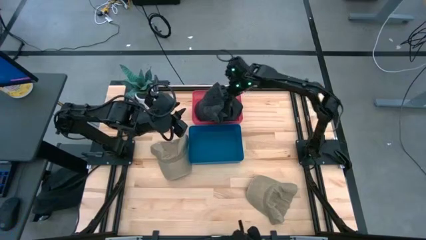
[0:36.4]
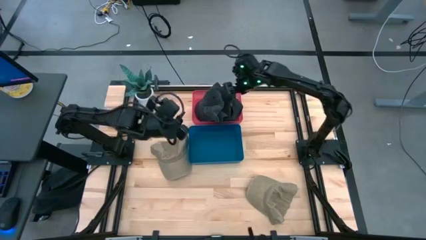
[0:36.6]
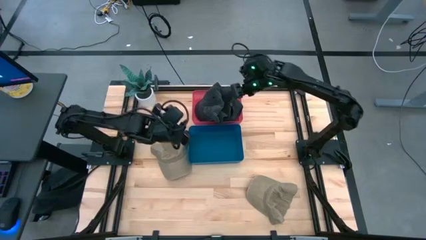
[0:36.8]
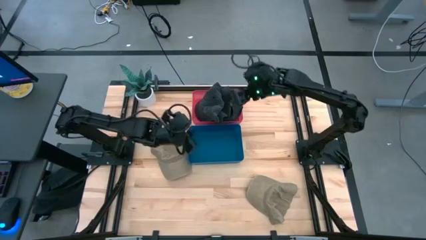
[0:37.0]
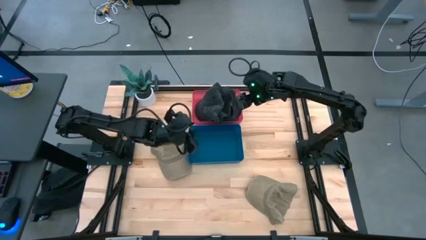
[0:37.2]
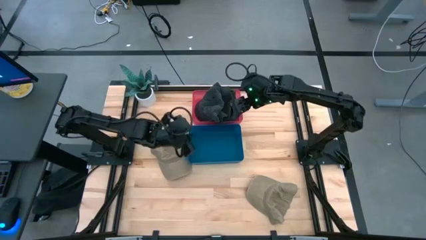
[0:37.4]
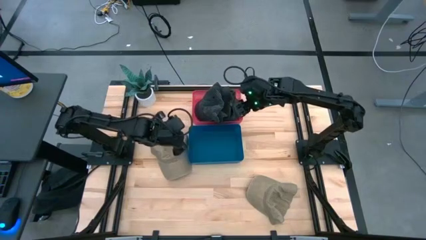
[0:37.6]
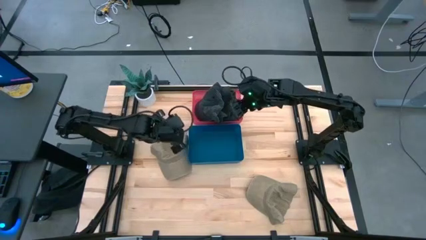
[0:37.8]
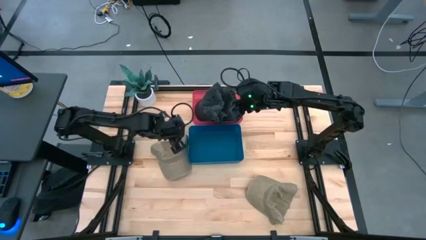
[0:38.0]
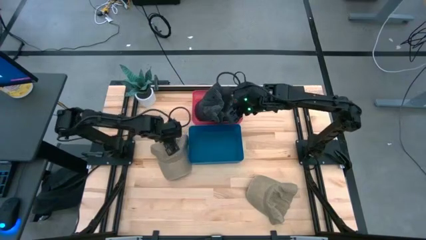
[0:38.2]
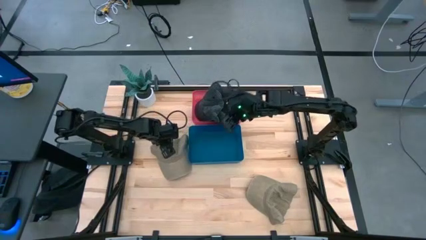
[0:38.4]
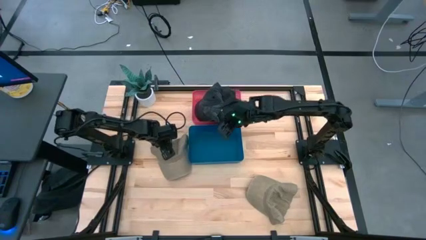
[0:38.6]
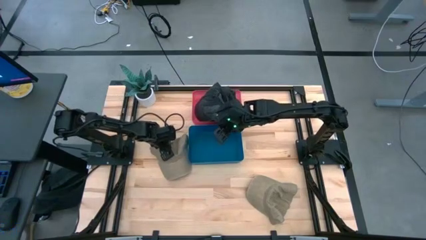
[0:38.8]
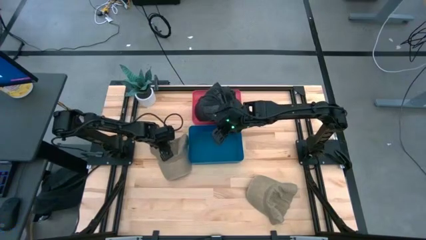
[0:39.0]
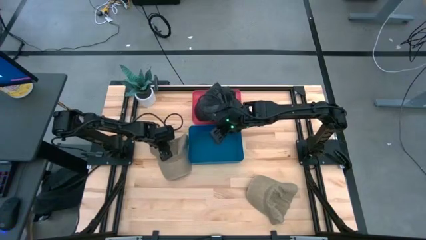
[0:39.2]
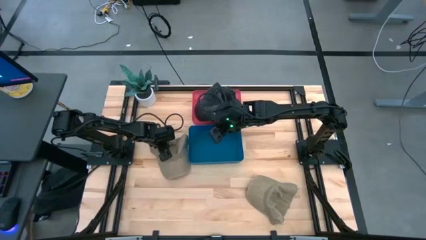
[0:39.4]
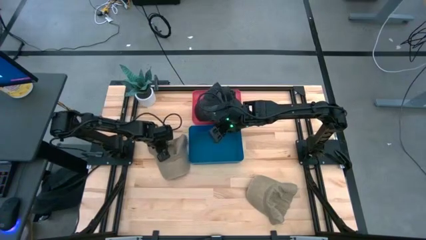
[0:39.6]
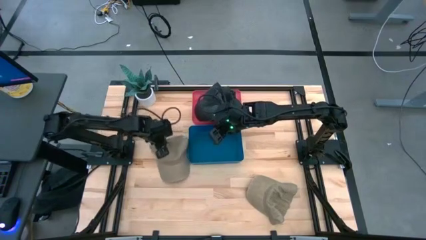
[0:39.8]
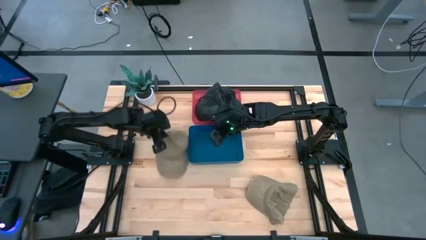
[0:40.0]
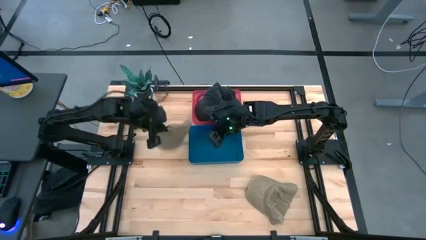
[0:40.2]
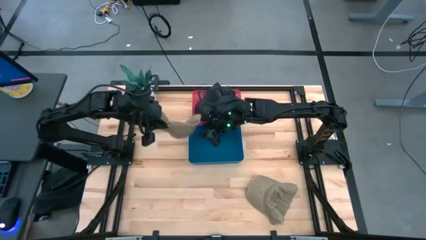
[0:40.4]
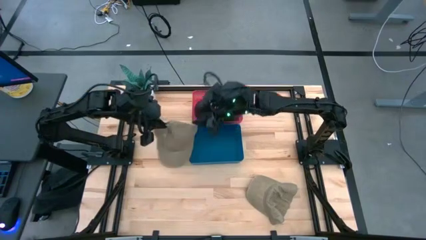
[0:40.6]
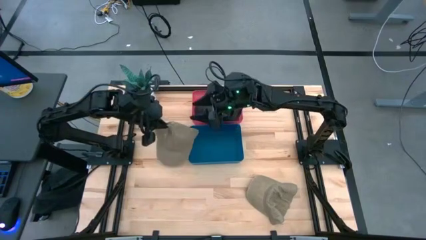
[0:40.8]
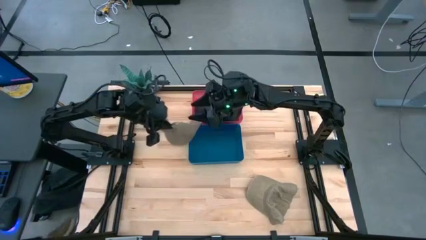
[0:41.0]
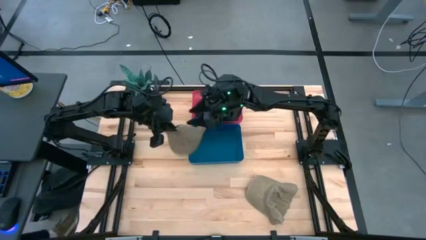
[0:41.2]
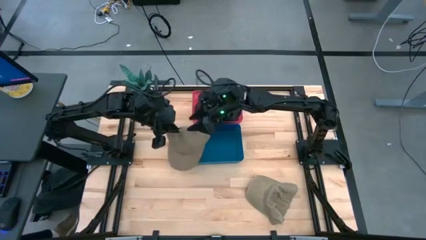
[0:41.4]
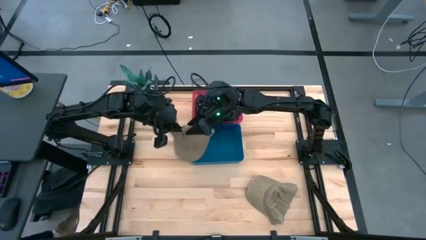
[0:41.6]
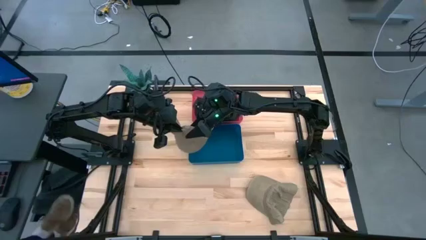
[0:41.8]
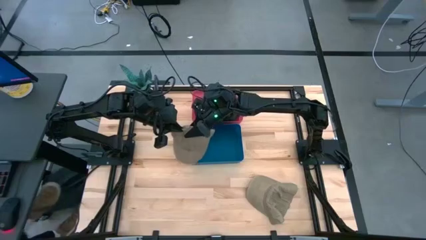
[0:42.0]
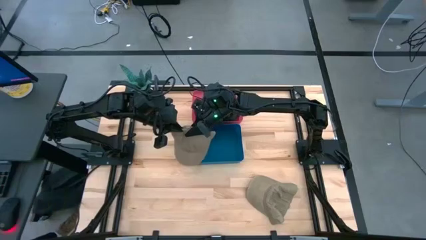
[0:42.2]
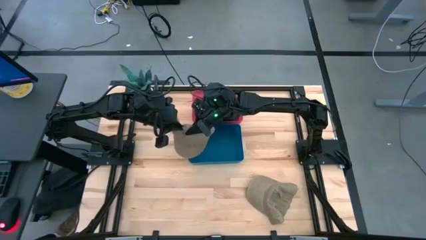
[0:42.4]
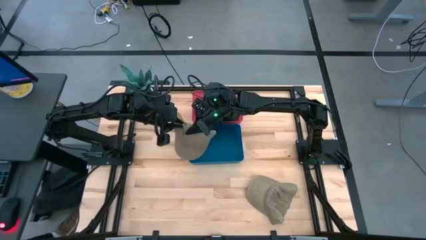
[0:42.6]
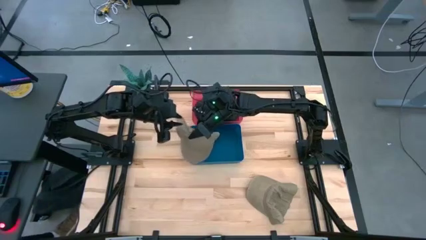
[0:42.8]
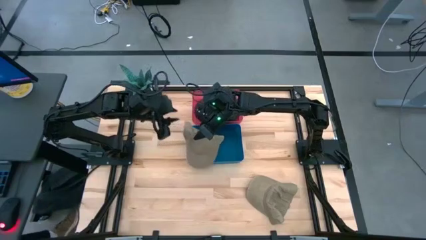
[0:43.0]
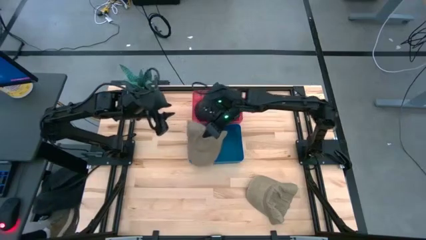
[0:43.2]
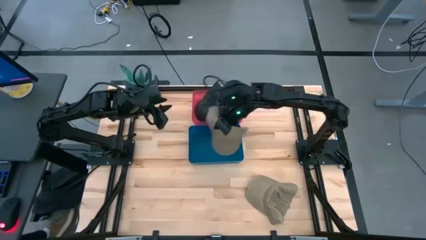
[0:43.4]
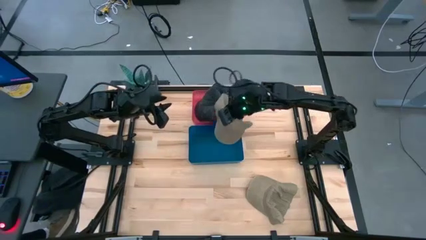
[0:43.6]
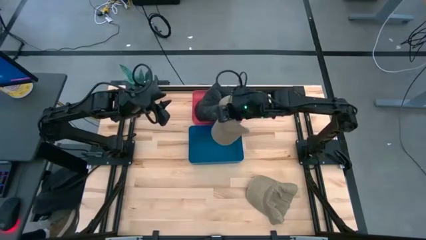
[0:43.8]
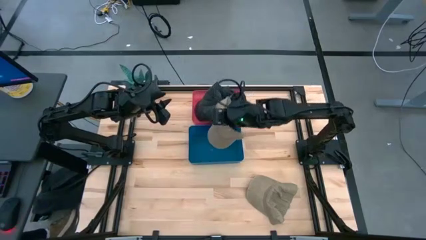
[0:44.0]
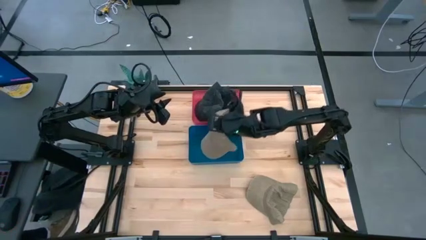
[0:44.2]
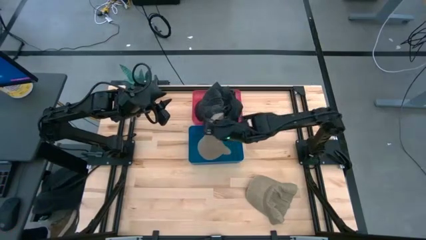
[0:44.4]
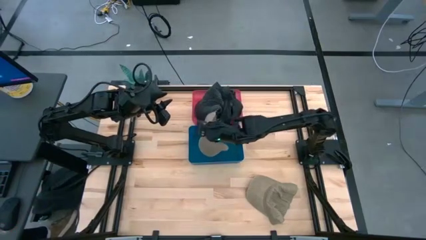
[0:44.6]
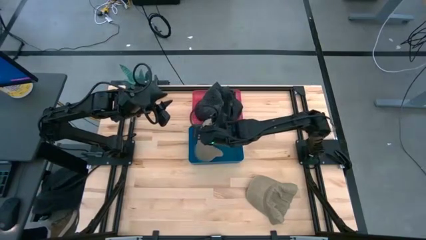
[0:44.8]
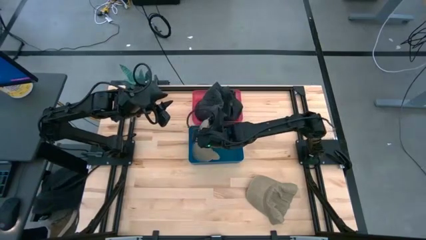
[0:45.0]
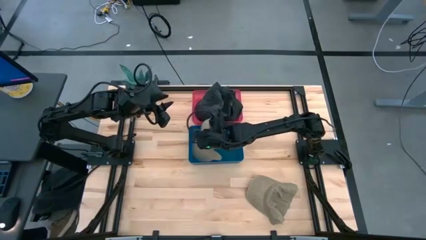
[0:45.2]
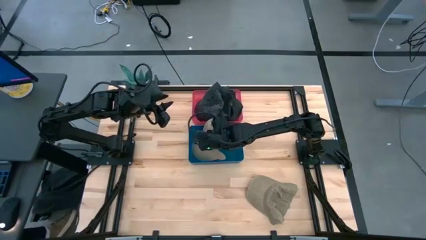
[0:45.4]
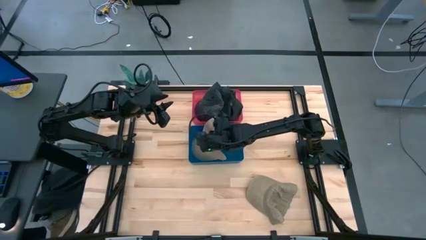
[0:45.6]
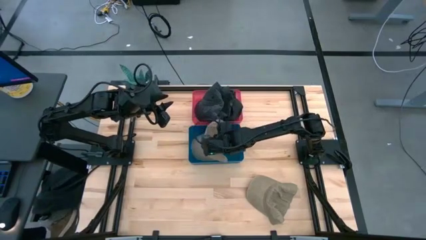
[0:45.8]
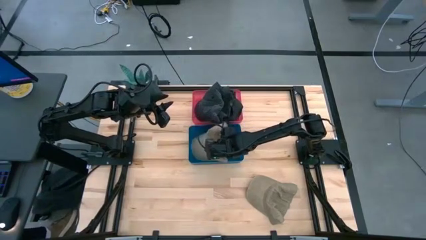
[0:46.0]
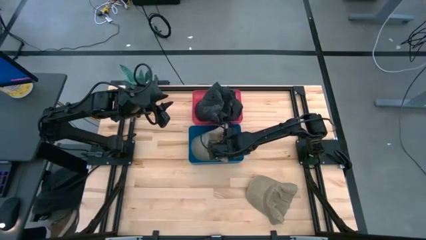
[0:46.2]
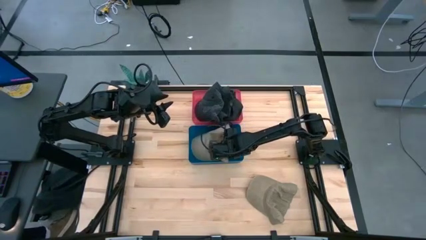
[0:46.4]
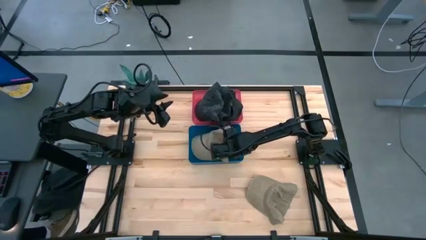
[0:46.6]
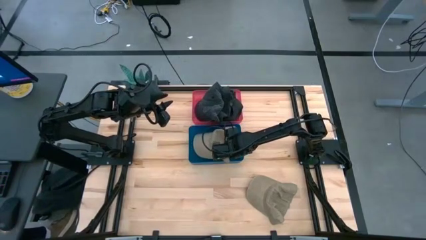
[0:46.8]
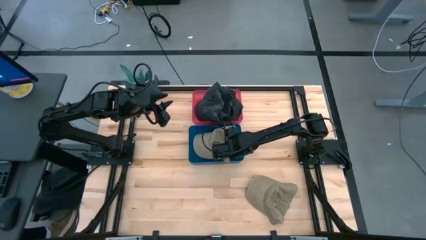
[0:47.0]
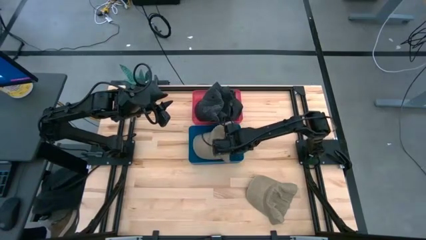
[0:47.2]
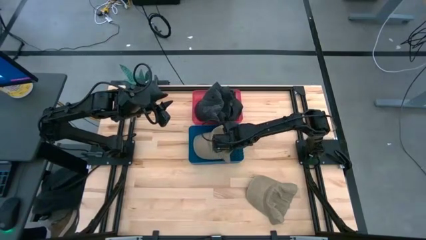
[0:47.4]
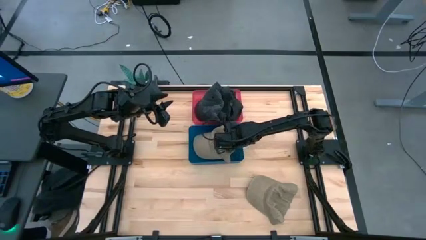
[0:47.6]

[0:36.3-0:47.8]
Task: Pick & Place hat
Put the top brown cap into the blue bin

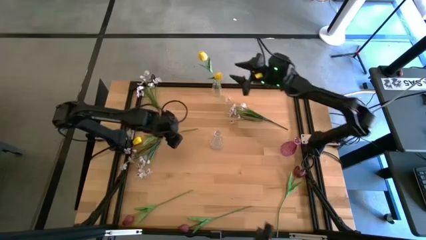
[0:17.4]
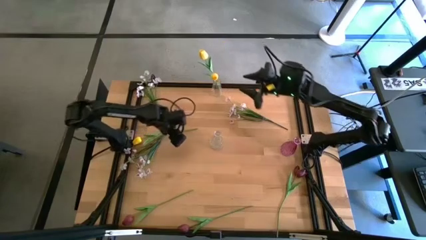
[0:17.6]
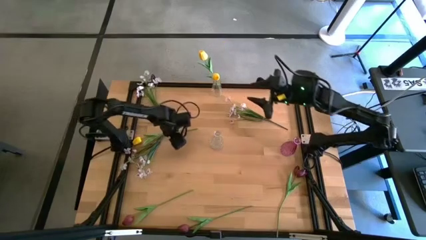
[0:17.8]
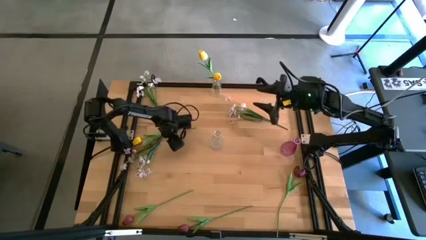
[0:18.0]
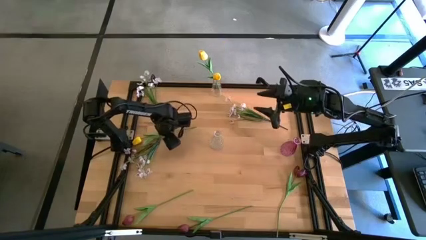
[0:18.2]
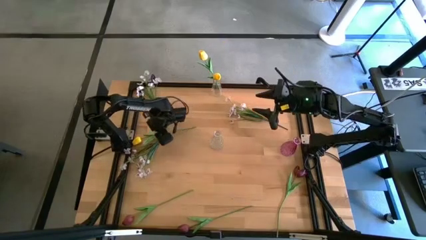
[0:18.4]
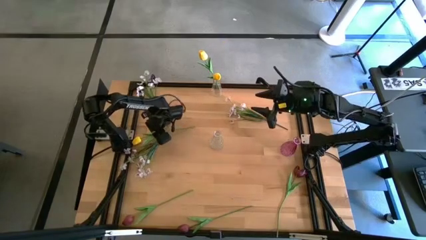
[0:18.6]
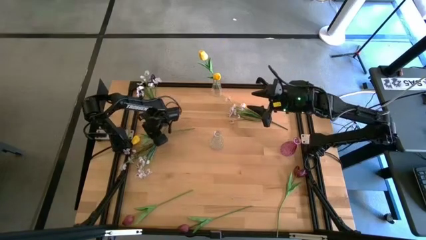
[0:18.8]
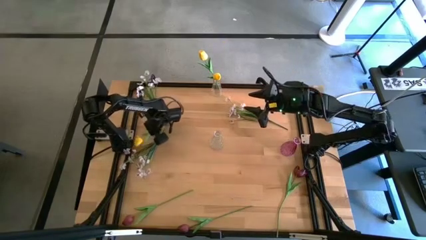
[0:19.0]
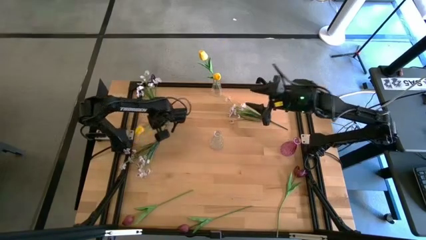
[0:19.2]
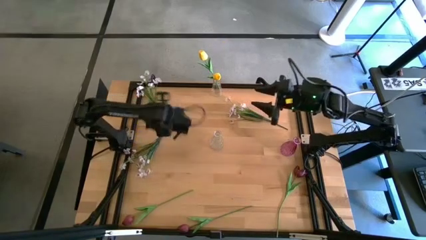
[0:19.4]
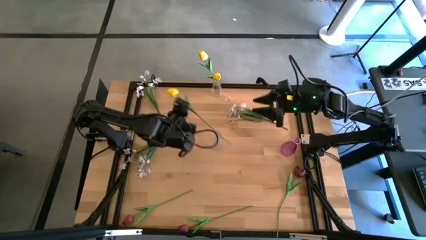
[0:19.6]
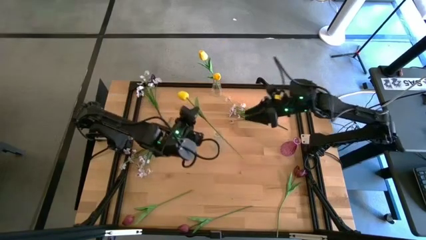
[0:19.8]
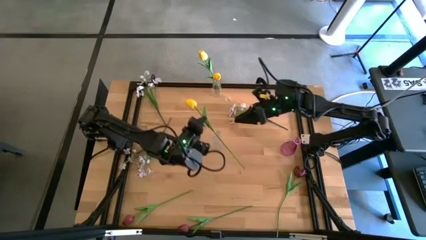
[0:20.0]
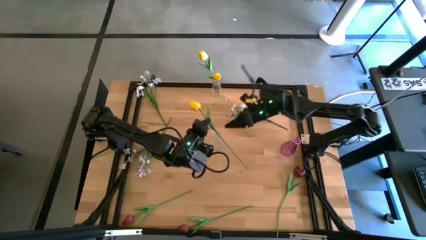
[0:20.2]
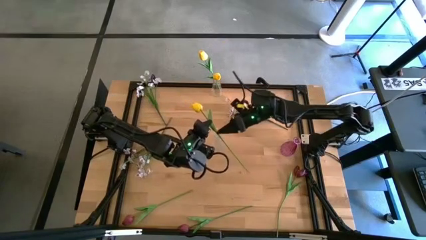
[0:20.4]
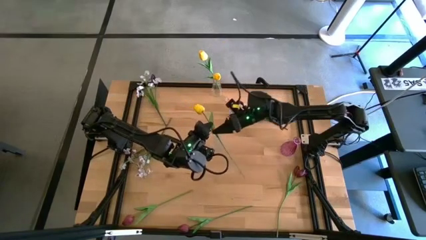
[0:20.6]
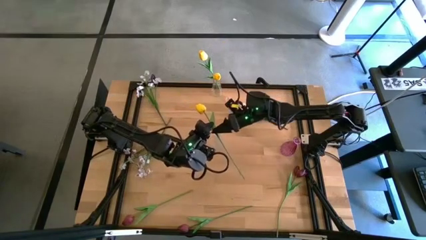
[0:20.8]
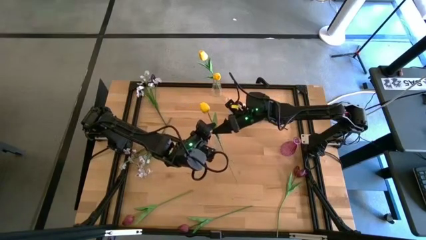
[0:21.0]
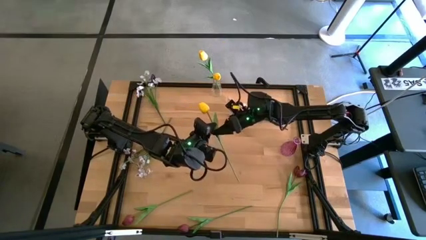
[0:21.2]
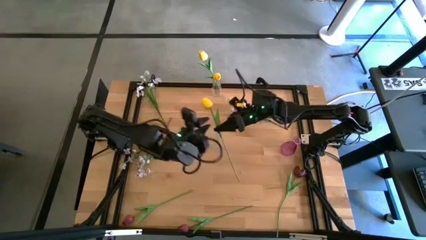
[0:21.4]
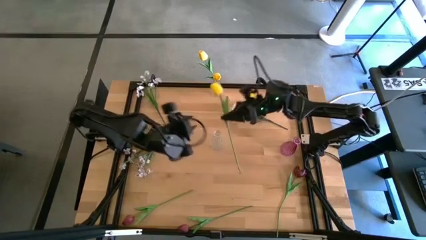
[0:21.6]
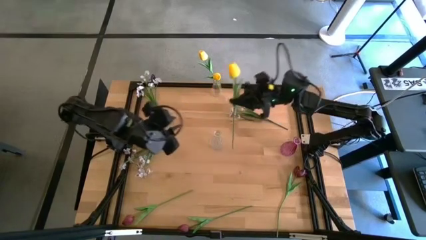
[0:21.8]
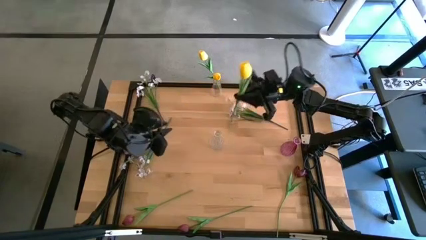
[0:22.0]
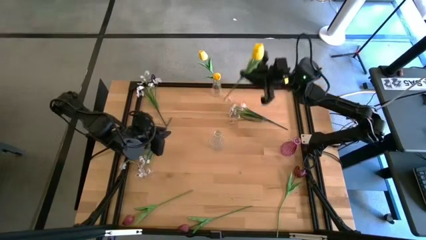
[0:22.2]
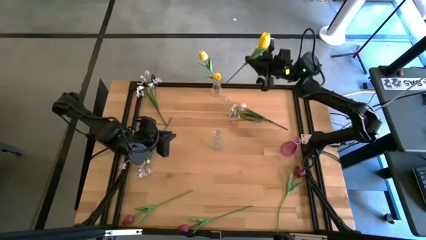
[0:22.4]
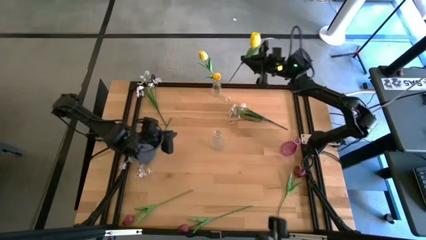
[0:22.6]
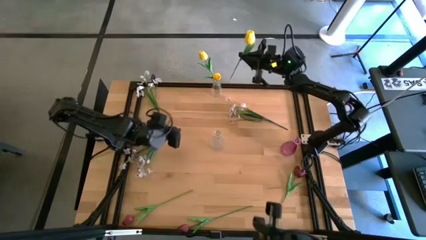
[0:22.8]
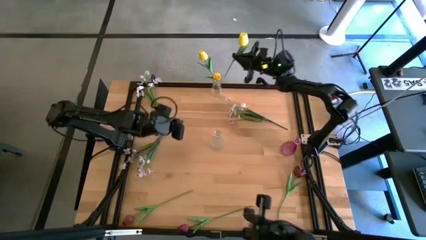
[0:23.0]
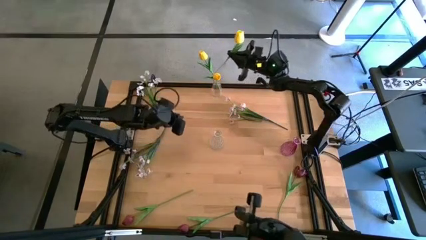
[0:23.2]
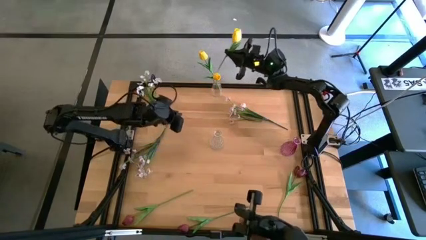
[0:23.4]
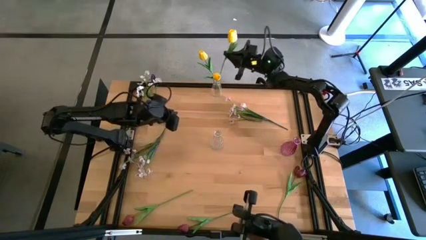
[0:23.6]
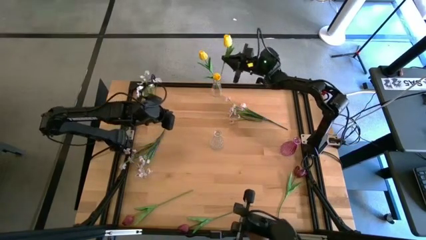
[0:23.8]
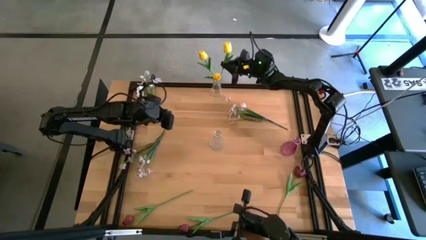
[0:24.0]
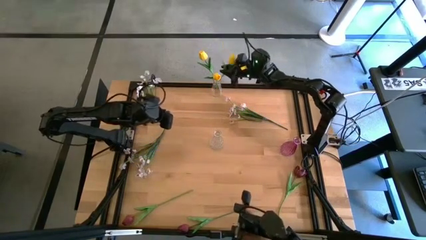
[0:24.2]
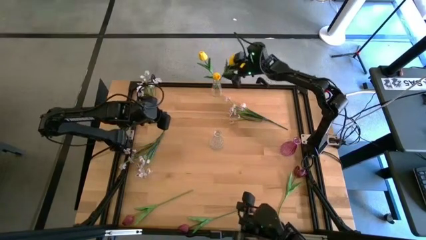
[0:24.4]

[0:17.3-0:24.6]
Task: Sort flowers into vase by color
Put the yellow flower into the top vase
